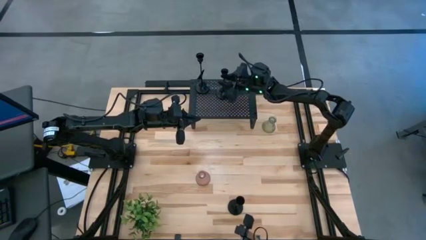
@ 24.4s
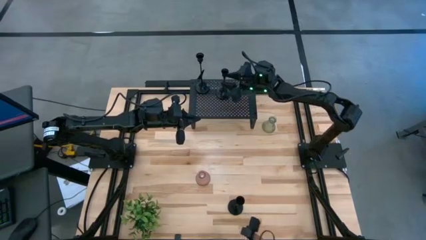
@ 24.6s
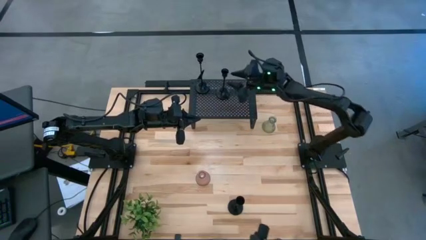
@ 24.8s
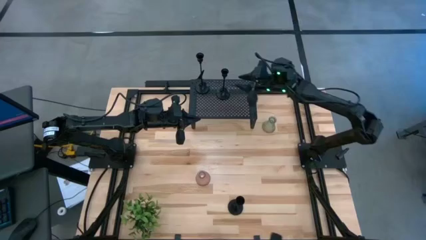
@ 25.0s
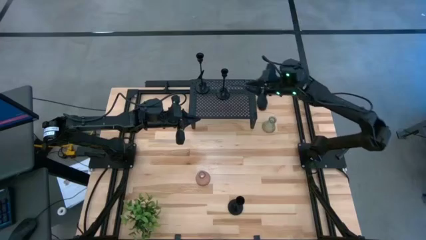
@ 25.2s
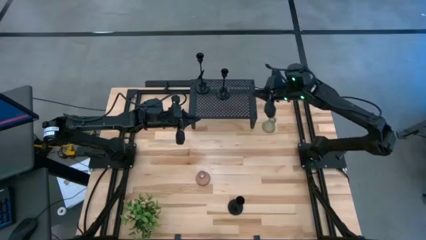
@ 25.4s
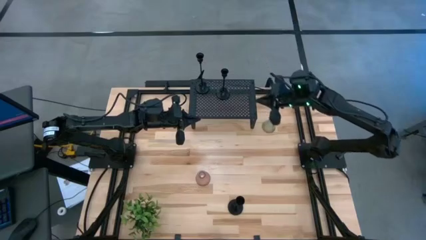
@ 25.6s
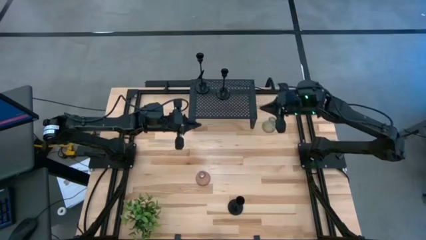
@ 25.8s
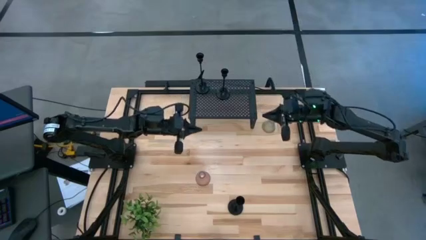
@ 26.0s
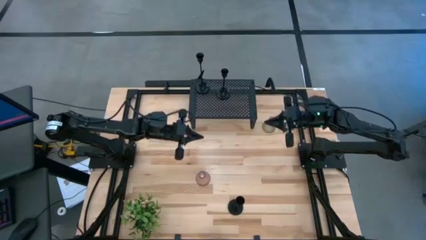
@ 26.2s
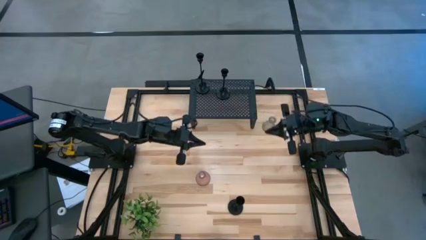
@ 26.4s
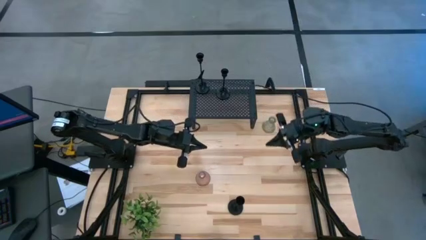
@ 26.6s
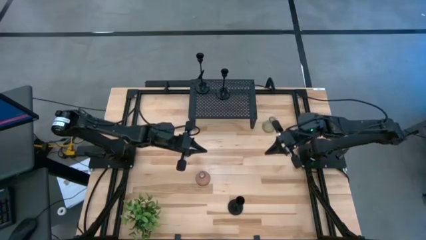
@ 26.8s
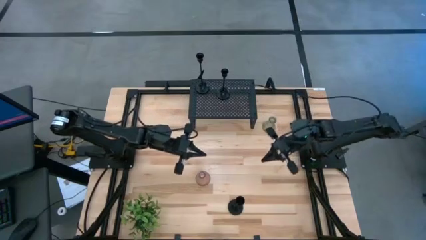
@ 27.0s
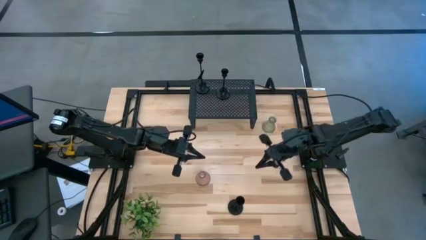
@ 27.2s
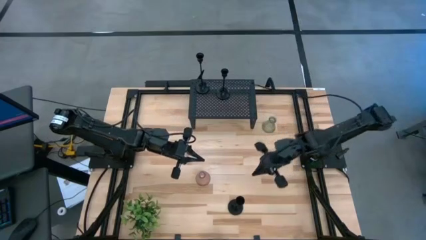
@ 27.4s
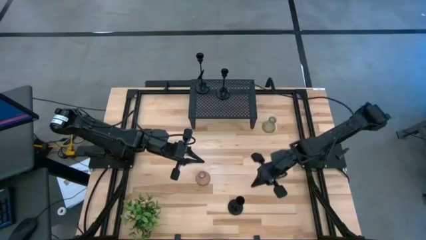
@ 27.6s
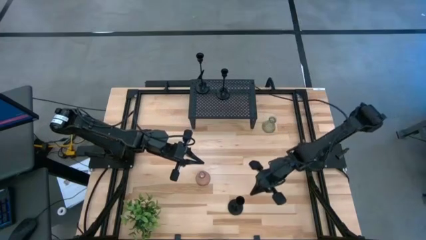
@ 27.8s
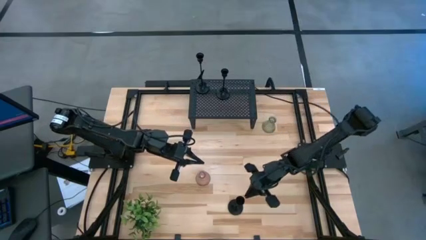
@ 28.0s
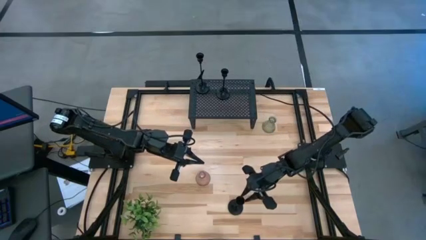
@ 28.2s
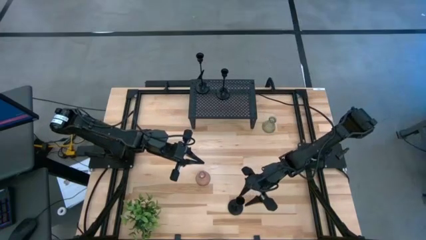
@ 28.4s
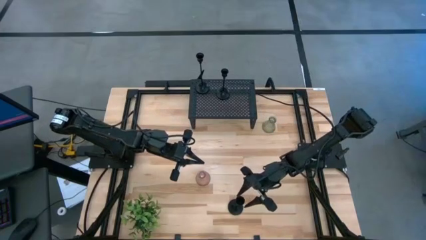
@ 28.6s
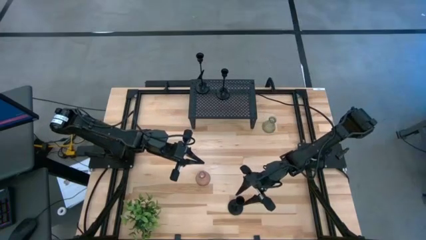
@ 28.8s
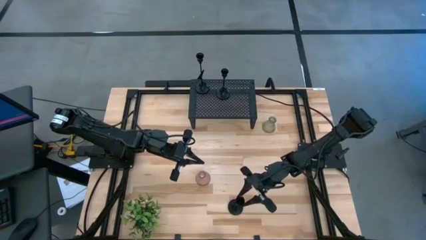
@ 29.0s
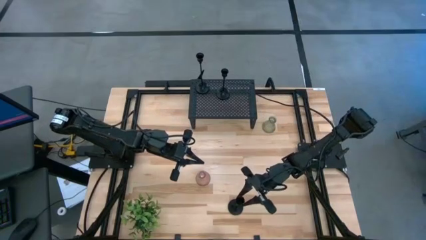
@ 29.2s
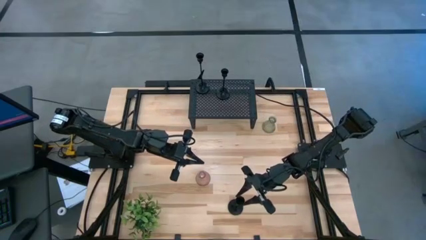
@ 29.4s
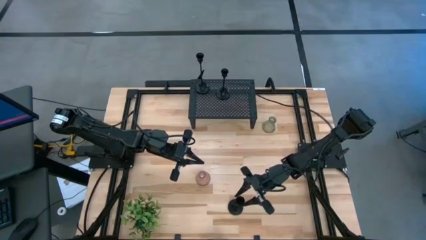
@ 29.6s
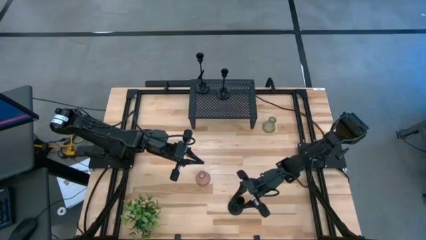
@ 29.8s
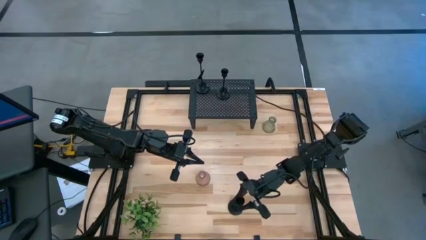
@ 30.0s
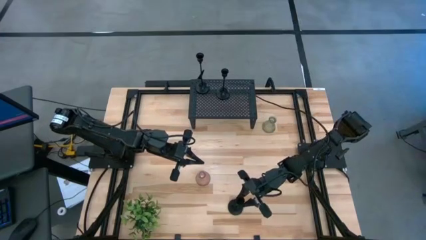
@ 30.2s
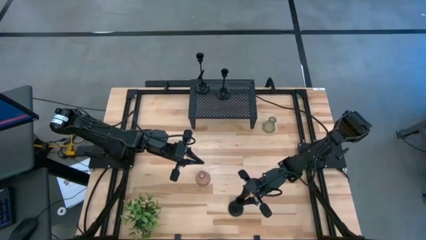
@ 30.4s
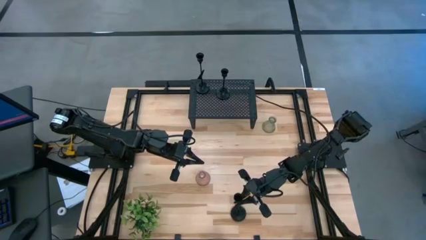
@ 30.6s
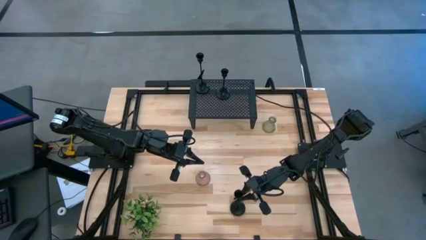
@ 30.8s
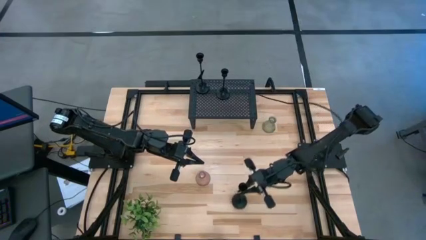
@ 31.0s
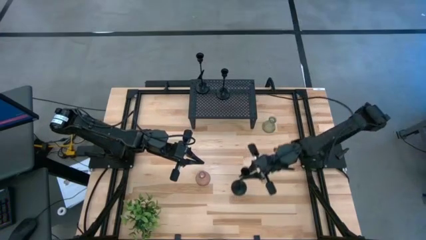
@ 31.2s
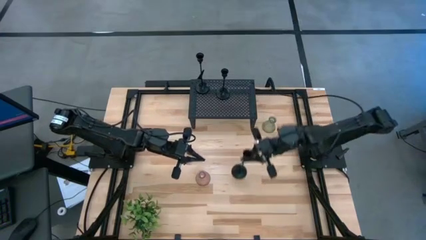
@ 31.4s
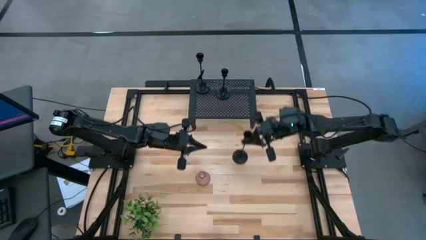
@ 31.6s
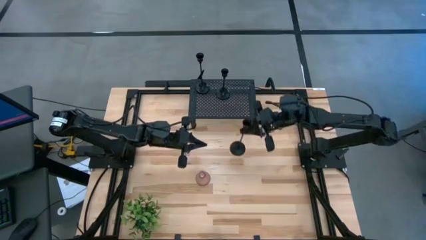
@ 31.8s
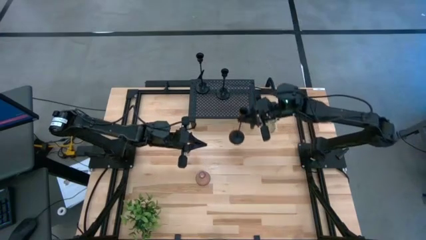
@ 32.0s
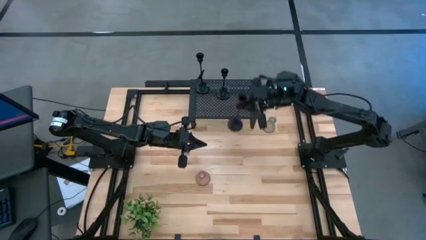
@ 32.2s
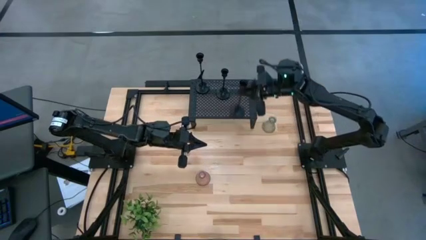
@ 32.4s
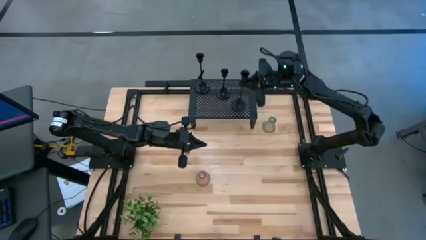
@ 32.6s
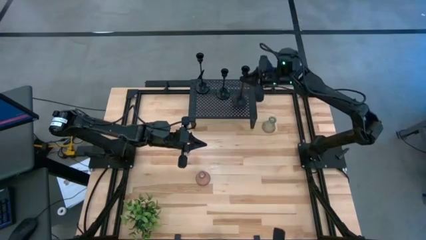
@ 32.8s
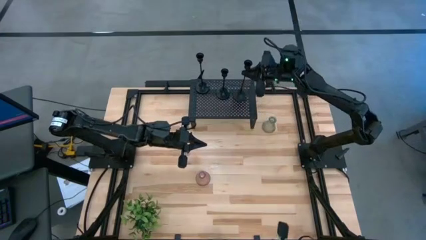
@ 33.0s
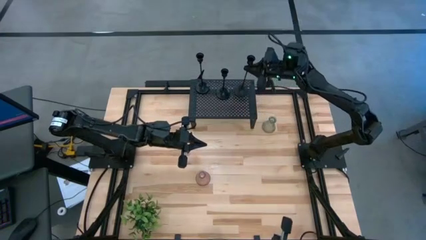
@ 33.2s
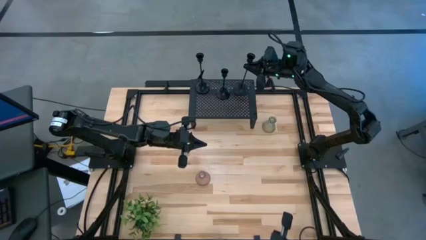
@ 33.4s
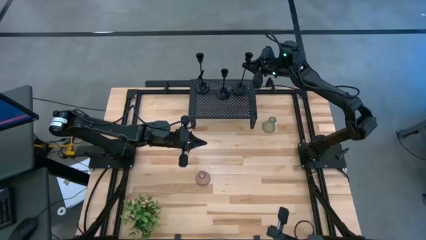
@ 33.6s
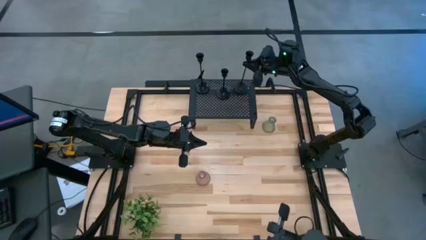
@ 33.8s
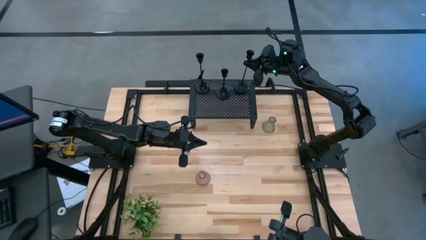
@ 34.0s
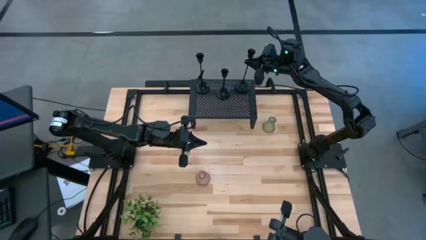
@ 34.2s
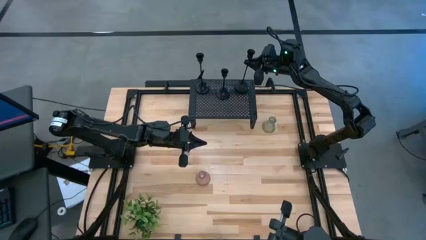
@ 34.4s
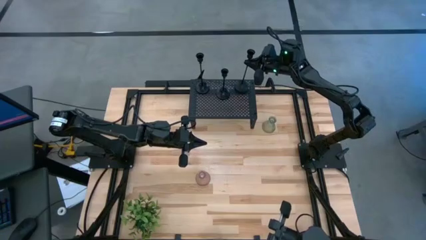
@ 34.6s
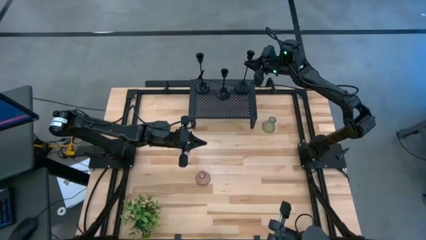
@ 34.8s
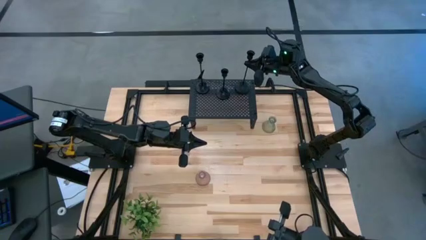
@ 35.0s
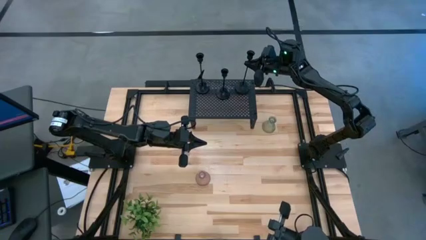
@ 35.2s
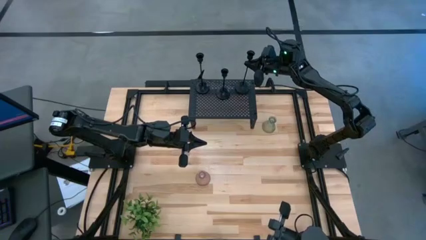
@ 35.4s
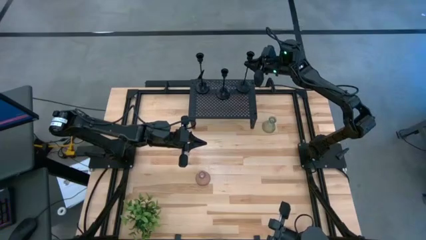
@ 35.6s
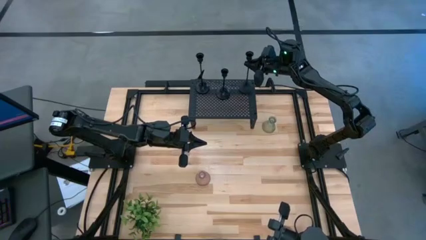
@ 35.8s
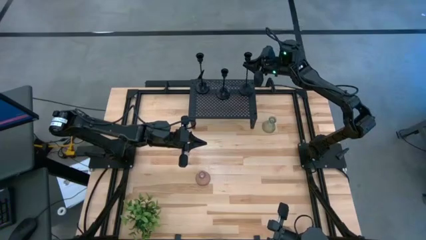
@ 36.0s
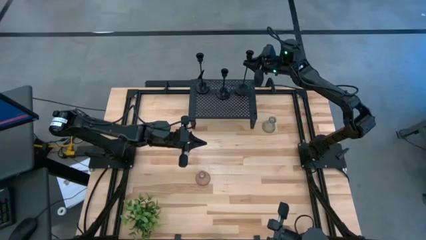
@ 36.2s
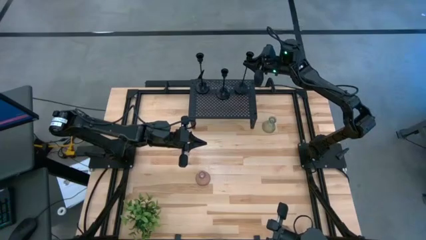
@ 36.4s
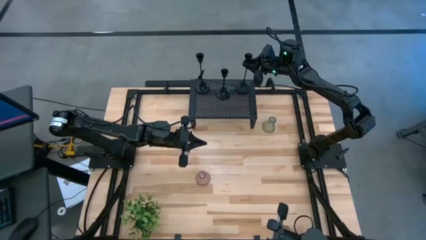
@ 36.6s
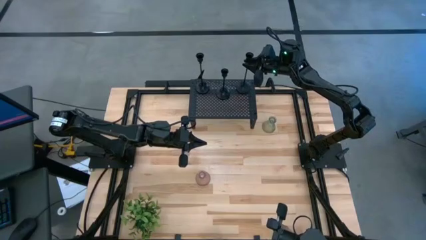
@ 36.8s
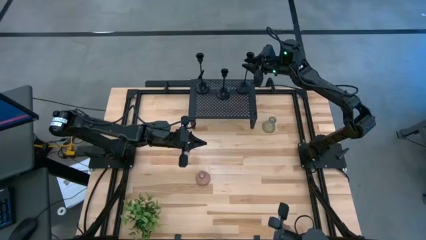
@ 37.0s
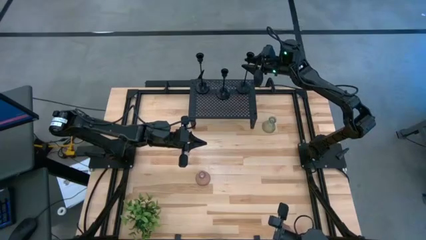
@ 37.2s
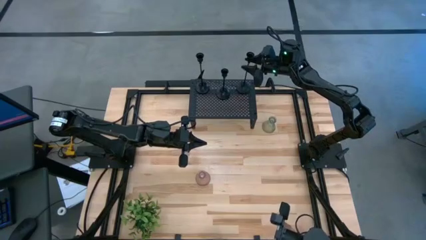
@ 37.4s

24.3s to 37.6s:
Task: Pick & Place candle stick holders
Put the black candle holder on the shelf
